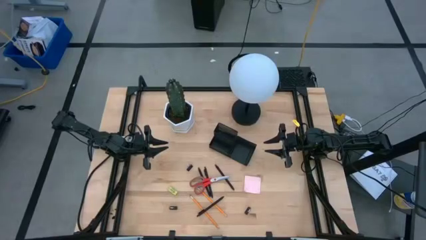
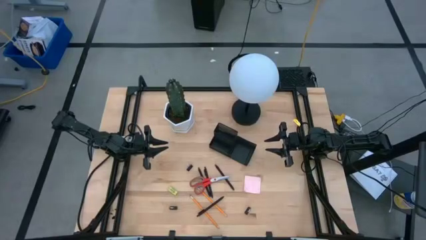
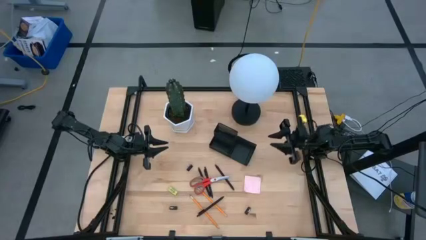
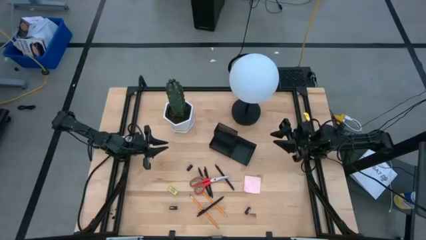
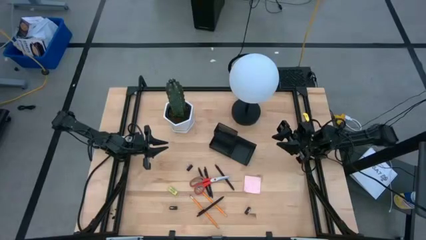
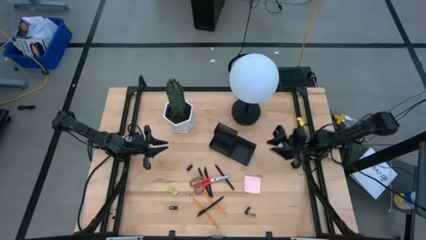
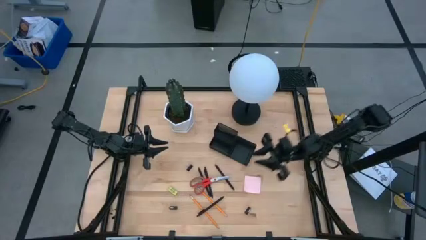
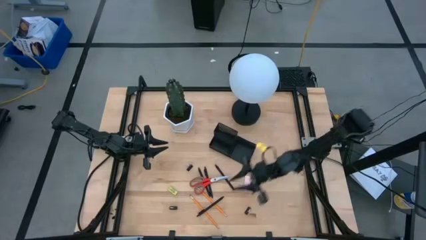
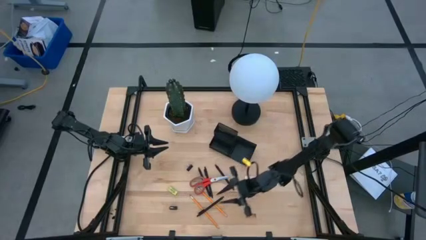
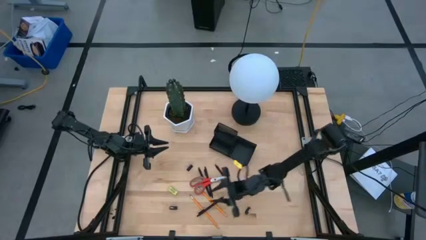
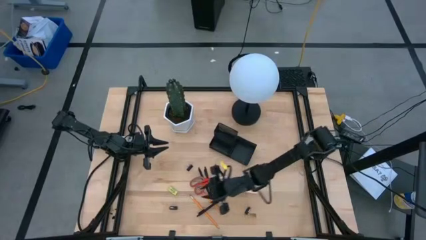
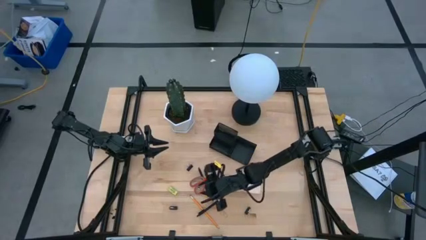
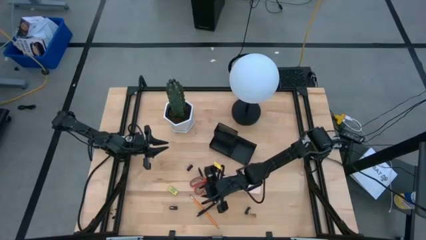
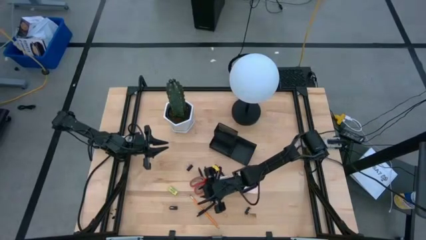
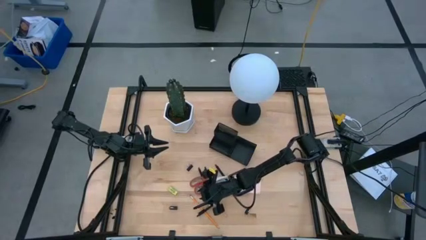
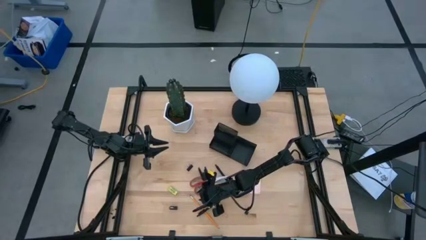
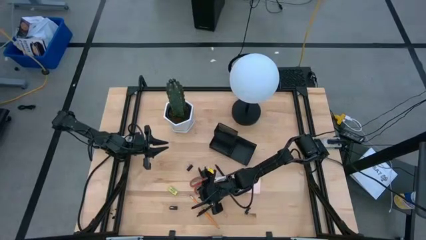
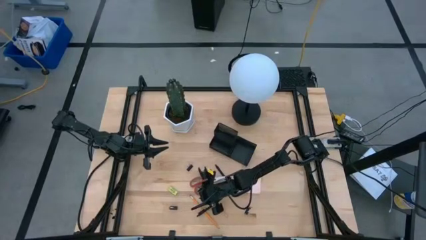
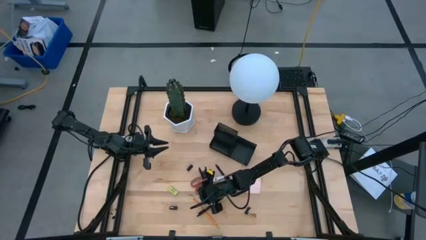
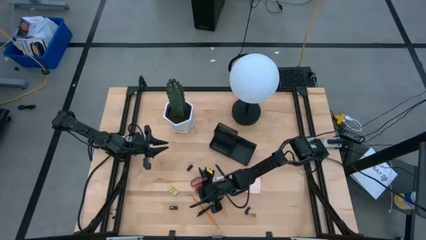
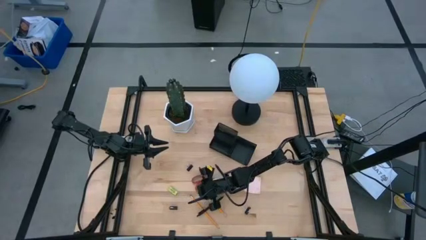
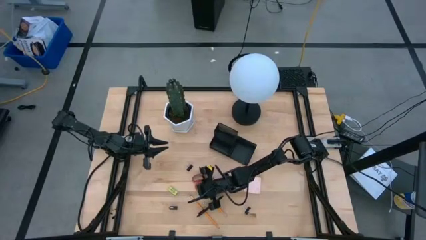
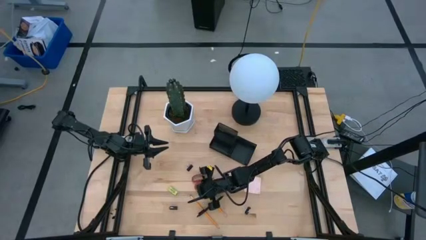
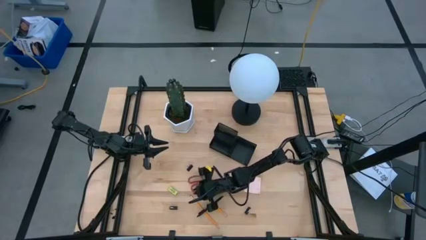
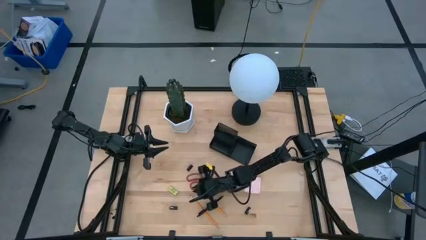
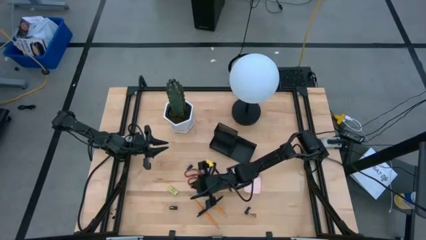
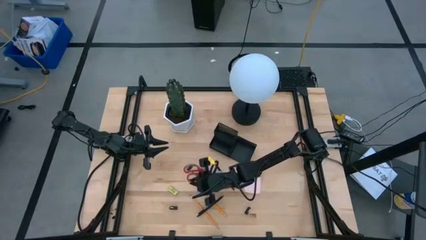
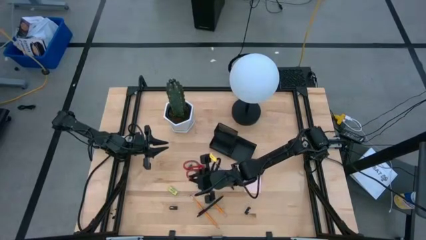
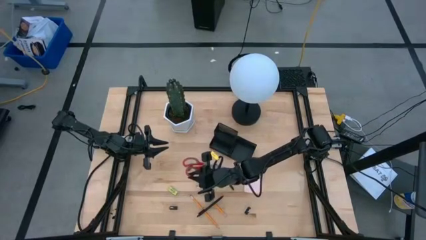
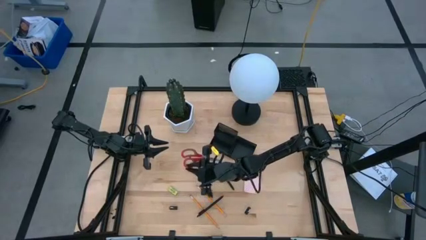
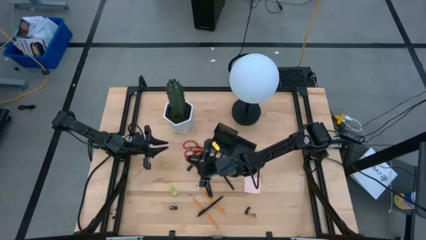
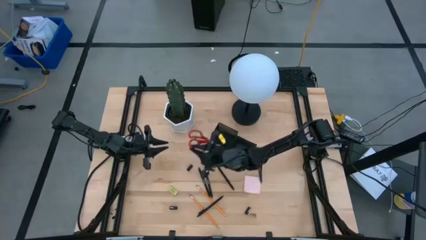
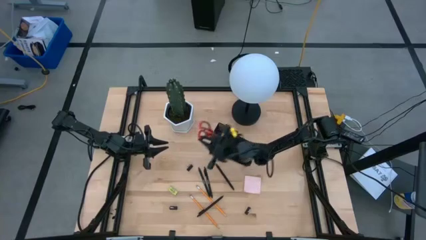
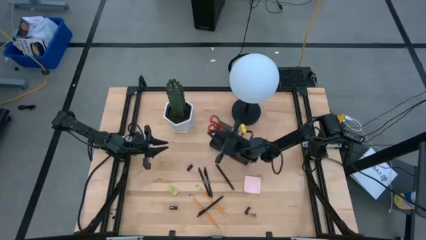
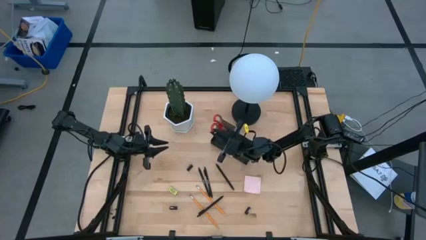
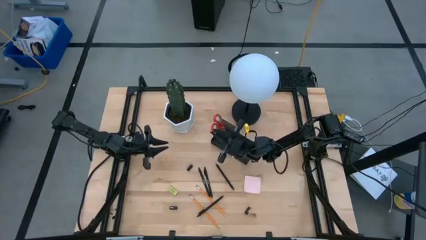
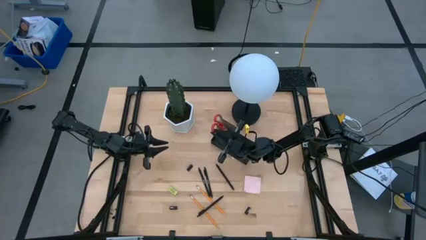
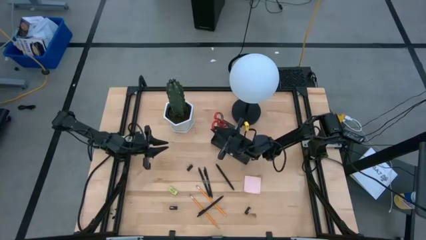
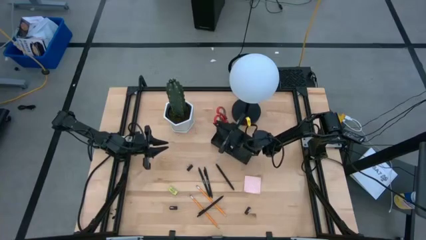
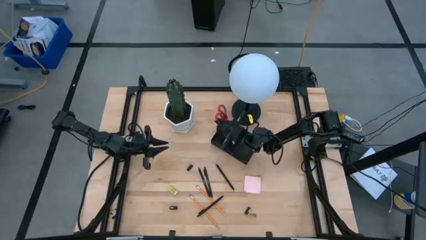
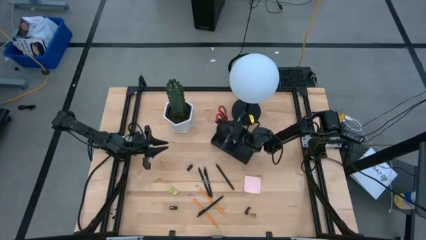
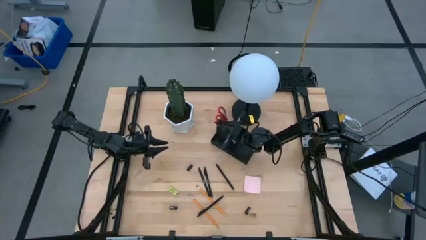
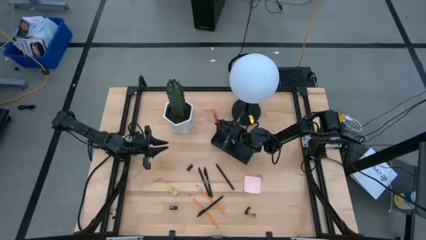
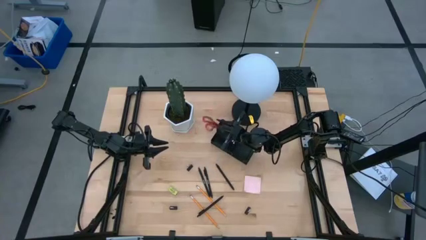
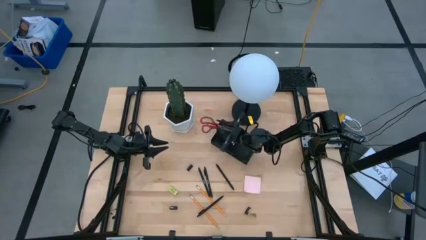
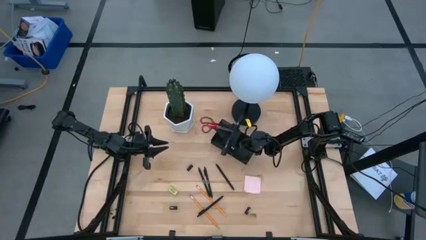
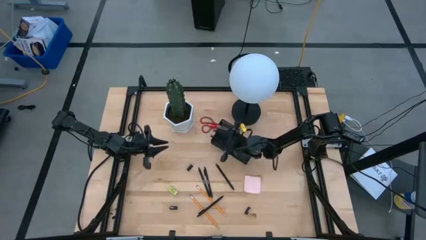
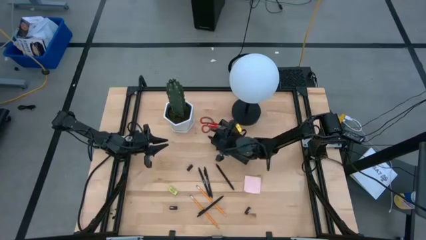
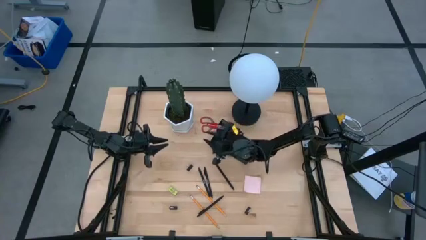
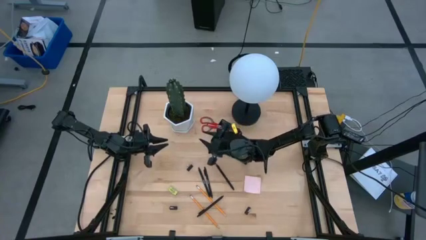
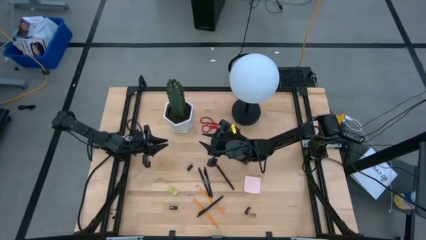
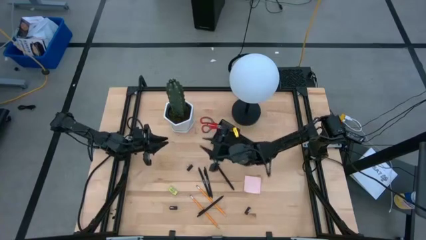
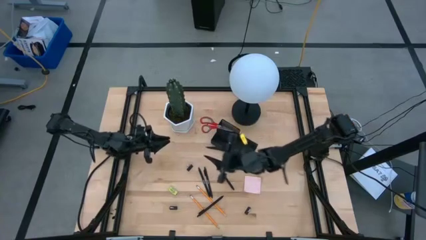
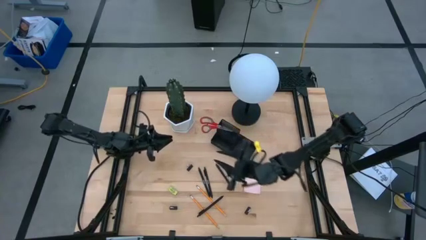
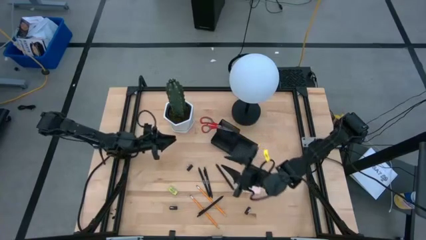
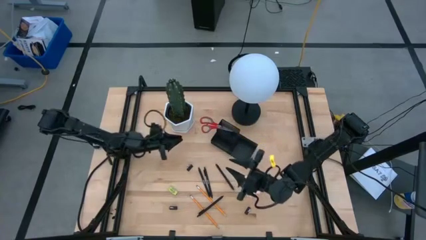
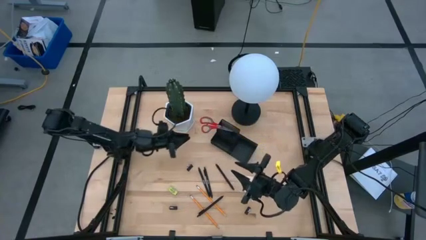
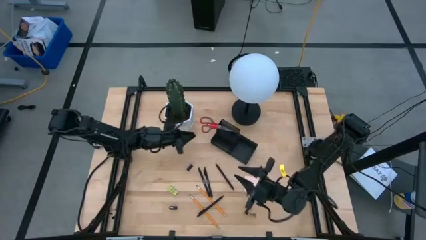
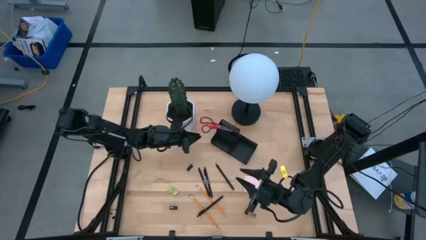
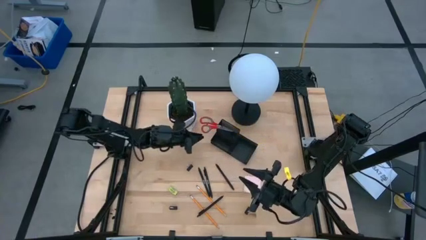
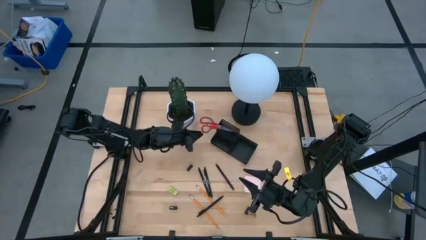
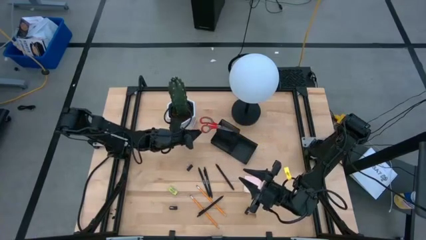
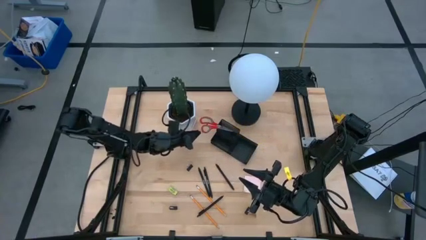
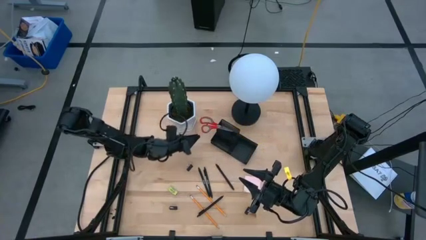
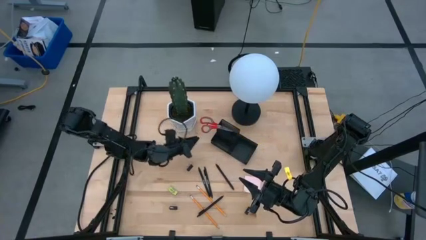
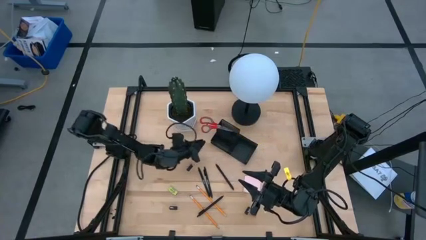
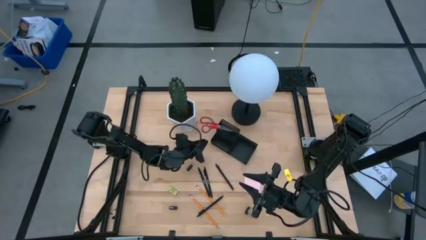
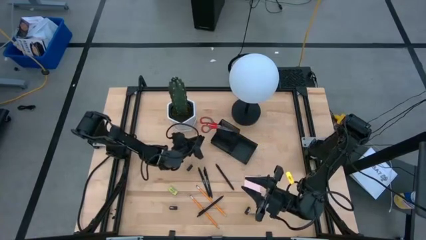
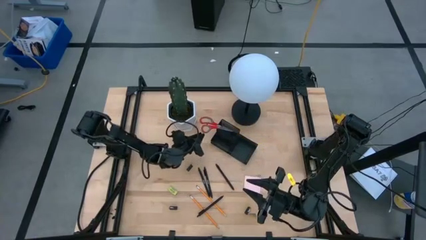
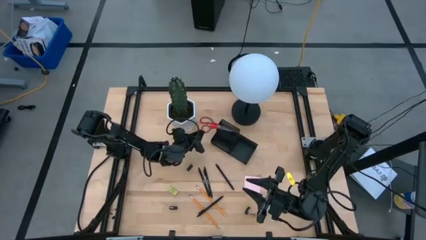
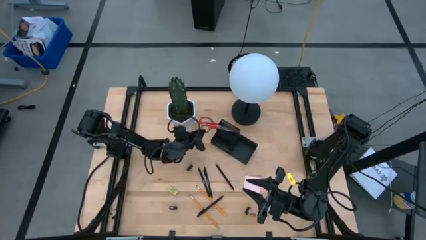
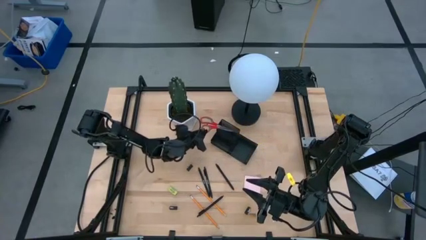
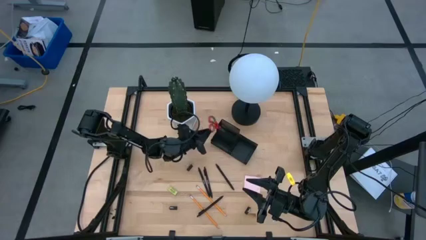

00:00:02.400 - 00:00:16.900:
Task: Pick and place office supplies into organizer
Put the red scissors into the black desk organizer
